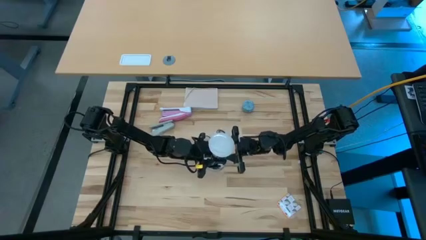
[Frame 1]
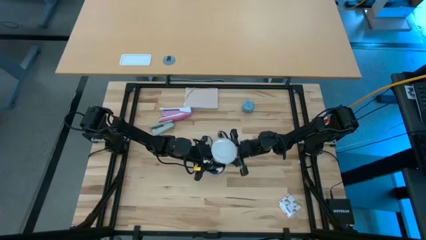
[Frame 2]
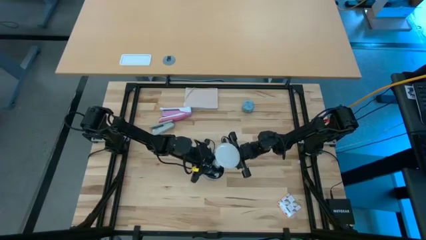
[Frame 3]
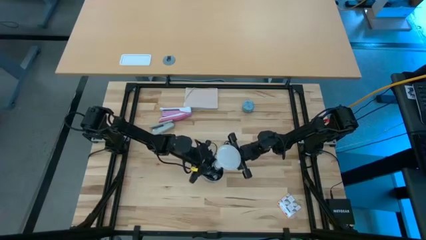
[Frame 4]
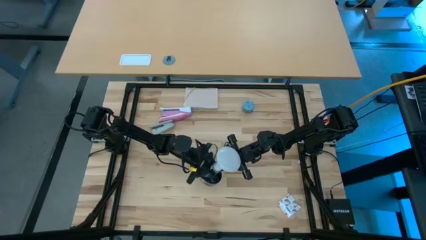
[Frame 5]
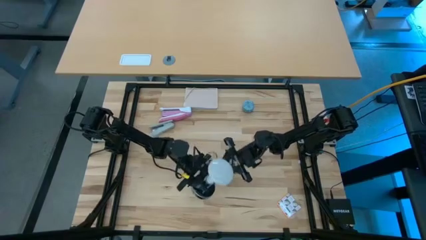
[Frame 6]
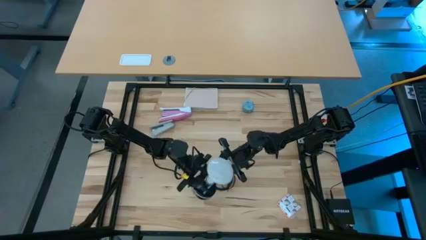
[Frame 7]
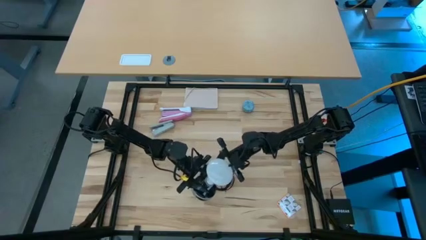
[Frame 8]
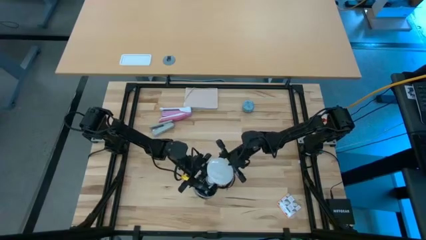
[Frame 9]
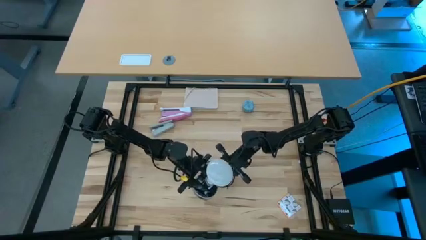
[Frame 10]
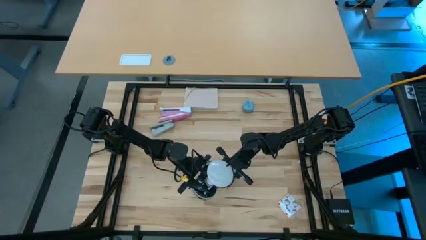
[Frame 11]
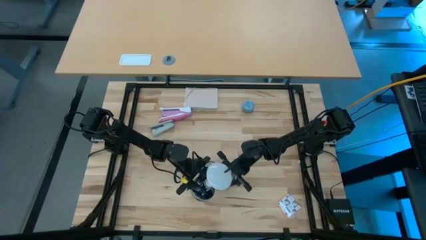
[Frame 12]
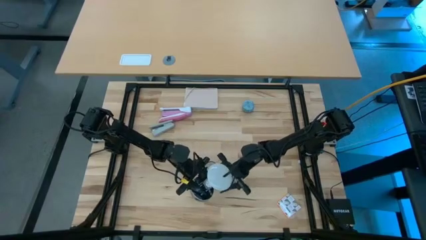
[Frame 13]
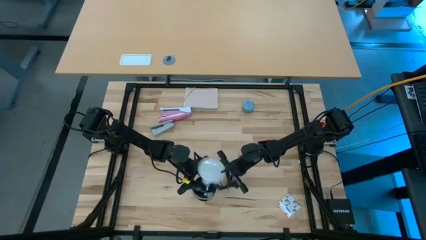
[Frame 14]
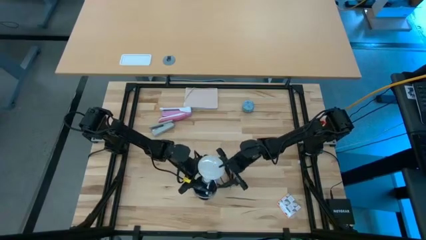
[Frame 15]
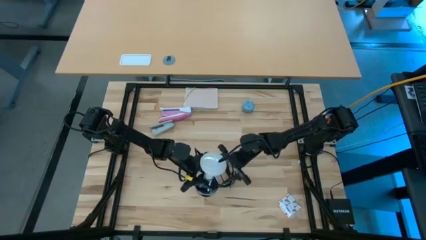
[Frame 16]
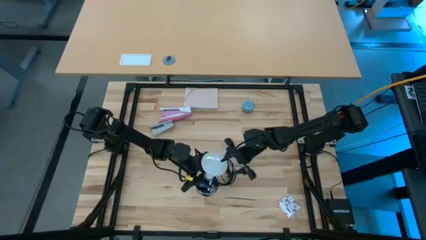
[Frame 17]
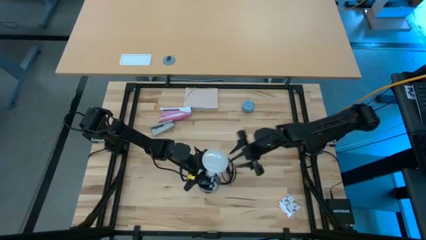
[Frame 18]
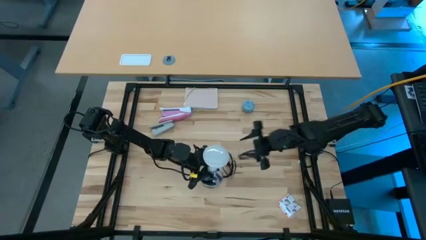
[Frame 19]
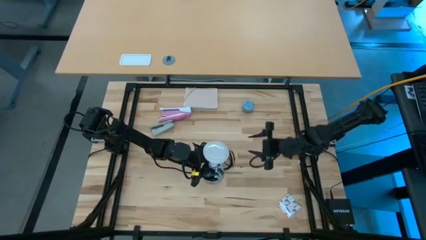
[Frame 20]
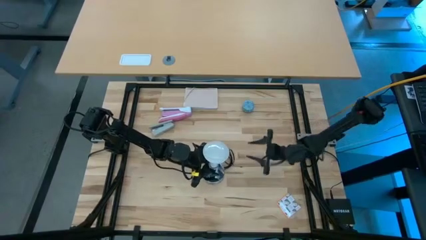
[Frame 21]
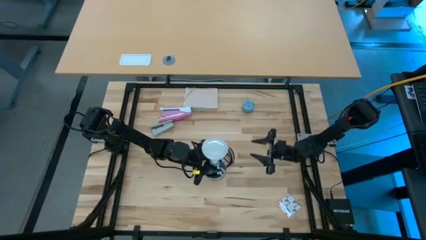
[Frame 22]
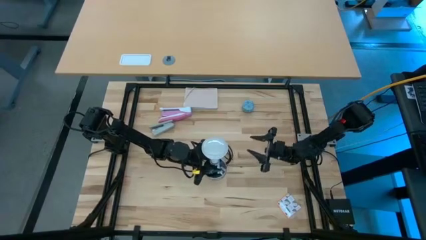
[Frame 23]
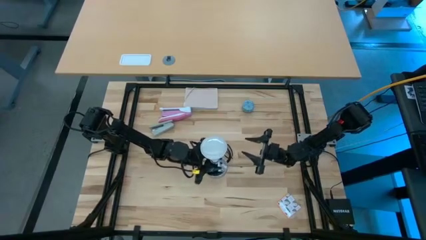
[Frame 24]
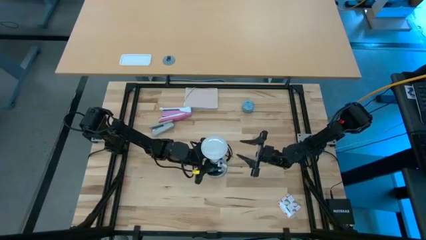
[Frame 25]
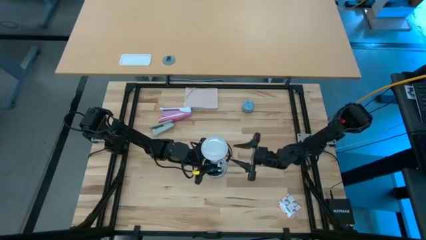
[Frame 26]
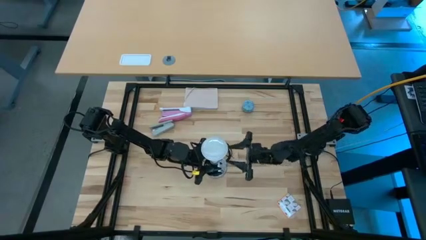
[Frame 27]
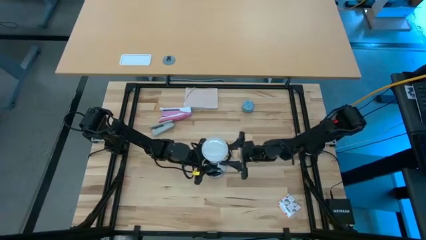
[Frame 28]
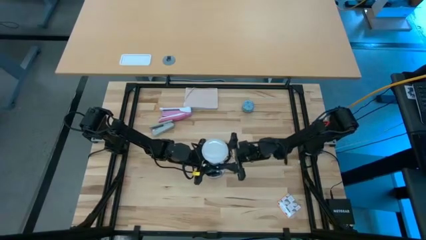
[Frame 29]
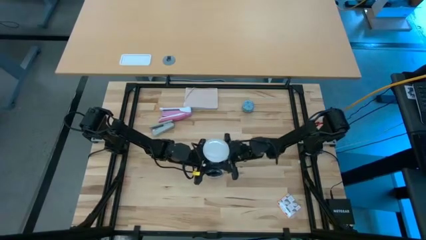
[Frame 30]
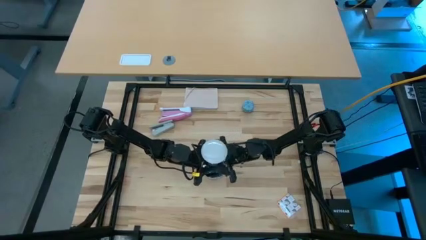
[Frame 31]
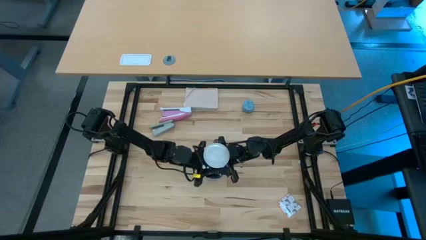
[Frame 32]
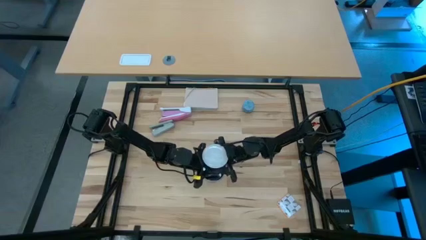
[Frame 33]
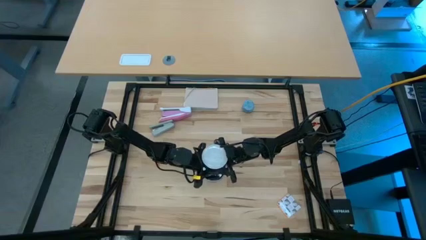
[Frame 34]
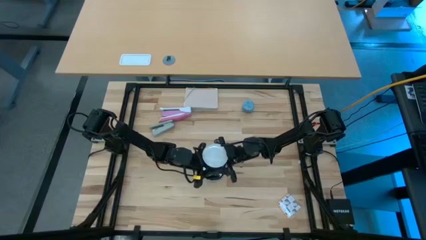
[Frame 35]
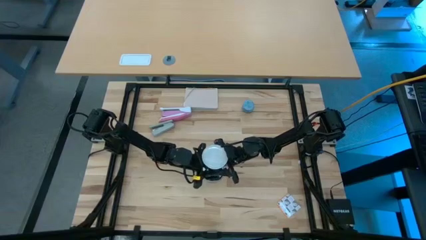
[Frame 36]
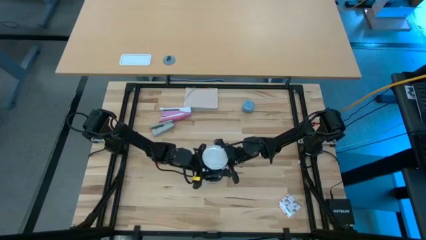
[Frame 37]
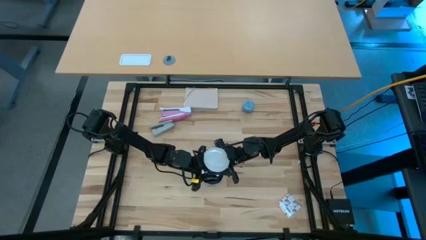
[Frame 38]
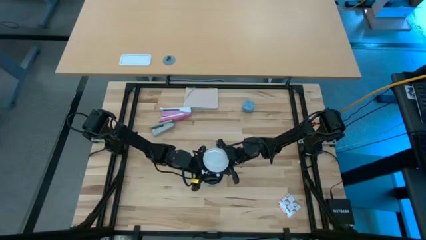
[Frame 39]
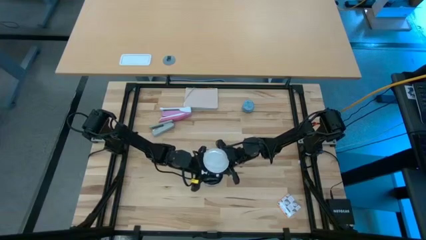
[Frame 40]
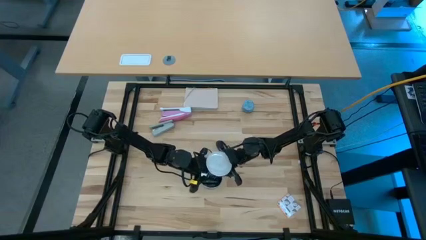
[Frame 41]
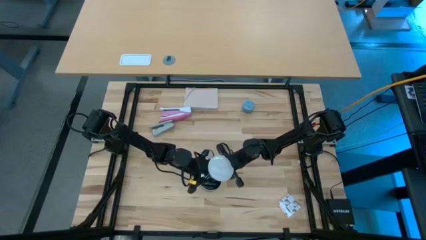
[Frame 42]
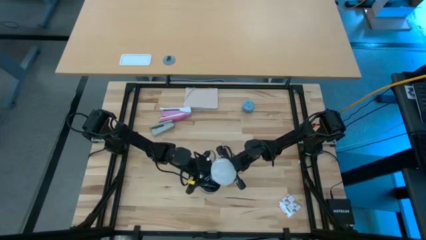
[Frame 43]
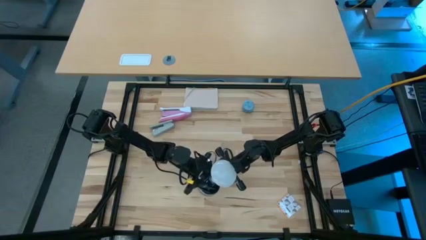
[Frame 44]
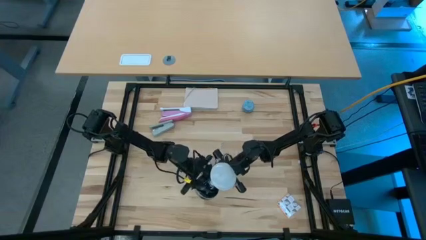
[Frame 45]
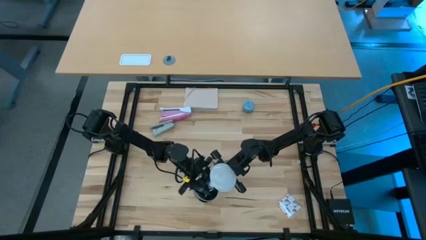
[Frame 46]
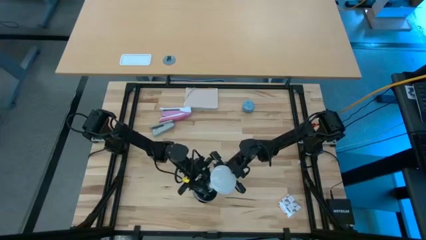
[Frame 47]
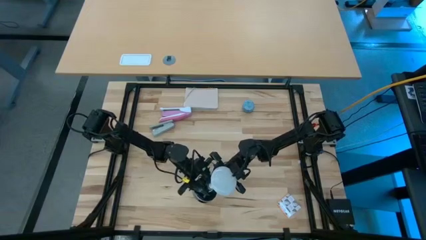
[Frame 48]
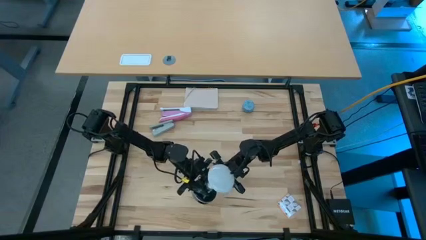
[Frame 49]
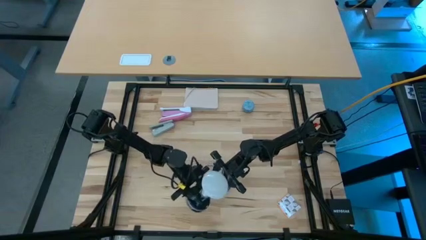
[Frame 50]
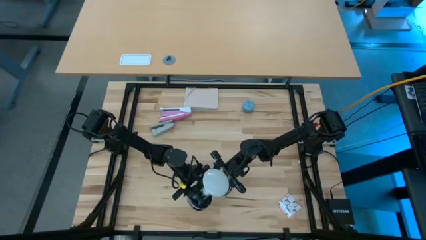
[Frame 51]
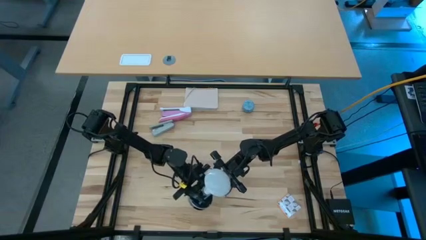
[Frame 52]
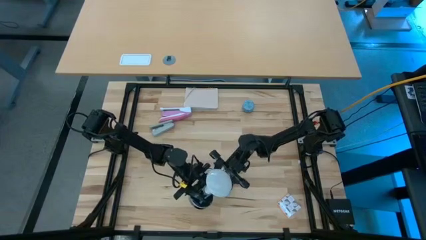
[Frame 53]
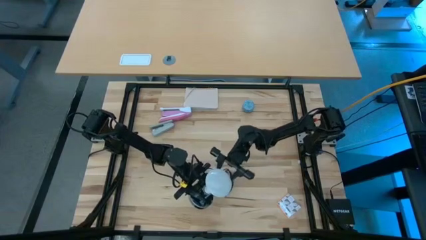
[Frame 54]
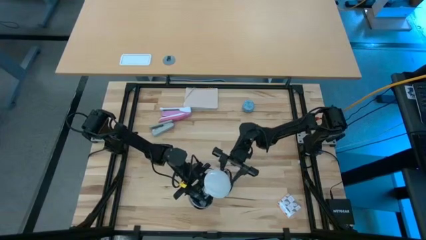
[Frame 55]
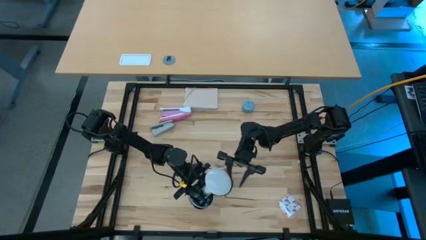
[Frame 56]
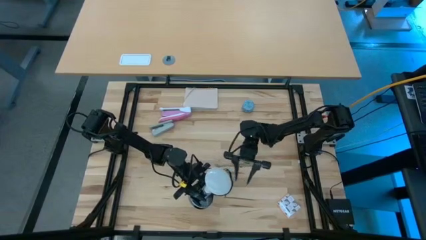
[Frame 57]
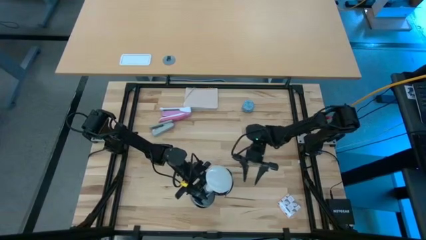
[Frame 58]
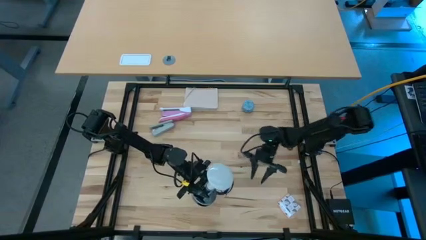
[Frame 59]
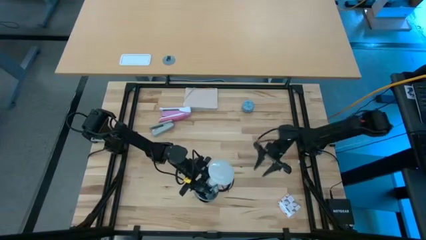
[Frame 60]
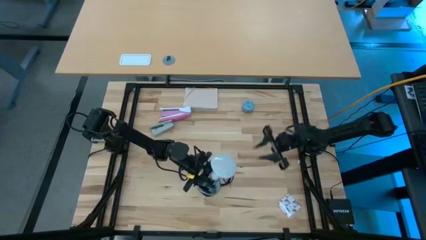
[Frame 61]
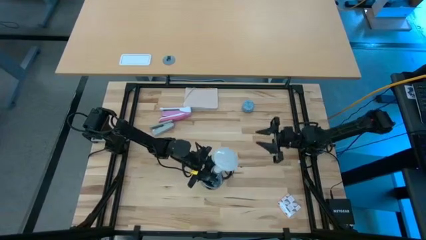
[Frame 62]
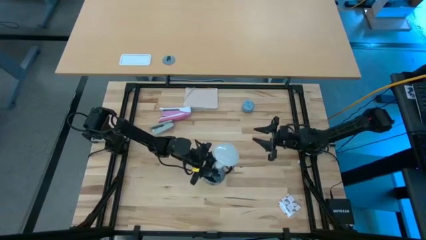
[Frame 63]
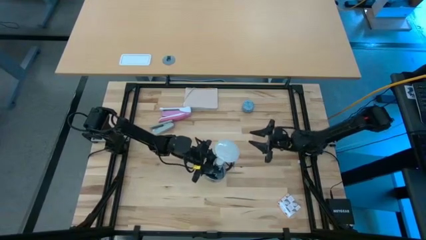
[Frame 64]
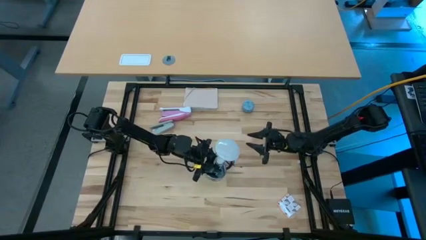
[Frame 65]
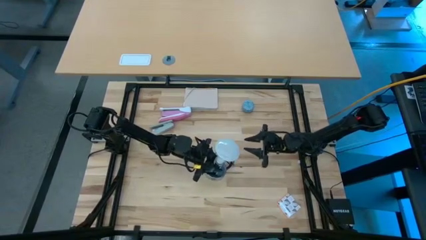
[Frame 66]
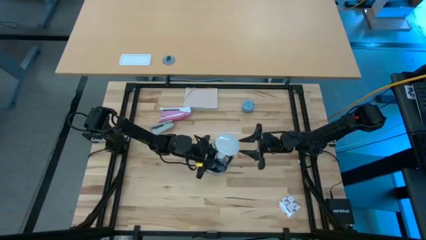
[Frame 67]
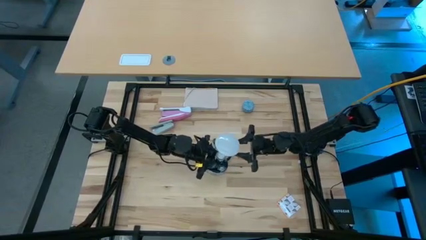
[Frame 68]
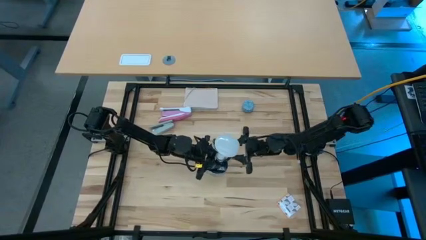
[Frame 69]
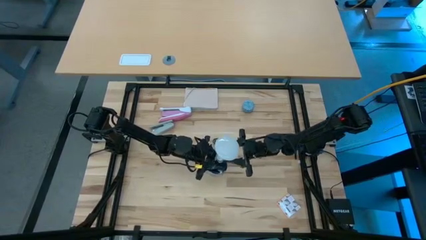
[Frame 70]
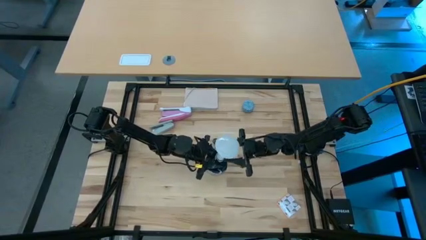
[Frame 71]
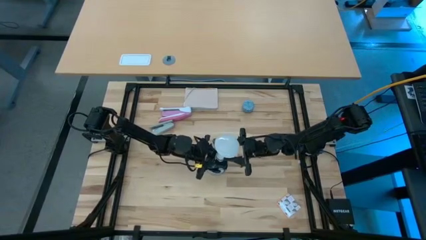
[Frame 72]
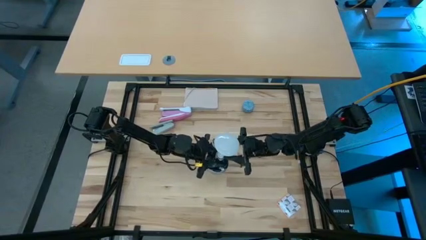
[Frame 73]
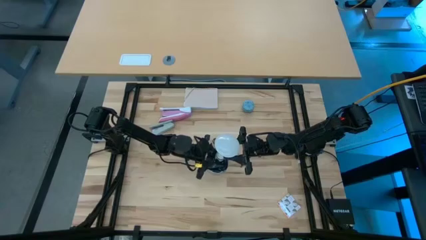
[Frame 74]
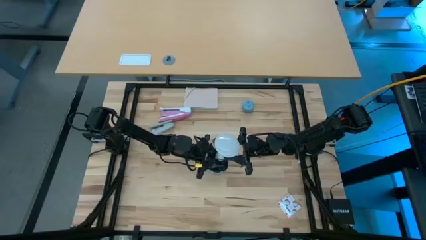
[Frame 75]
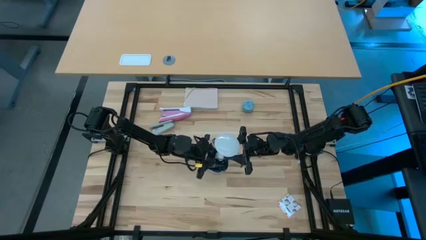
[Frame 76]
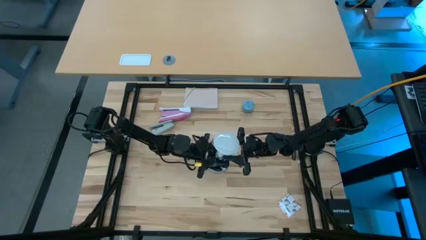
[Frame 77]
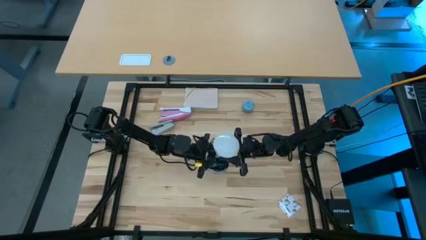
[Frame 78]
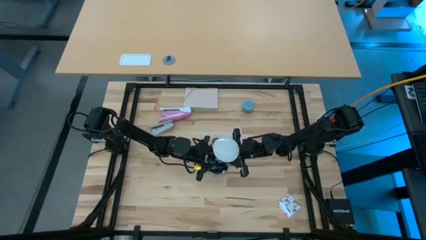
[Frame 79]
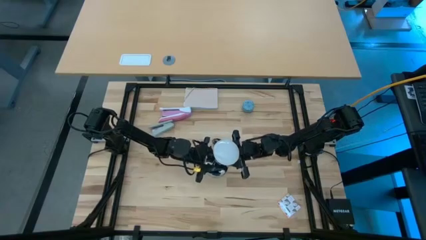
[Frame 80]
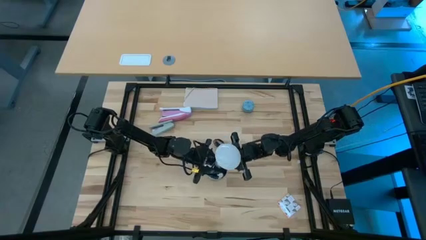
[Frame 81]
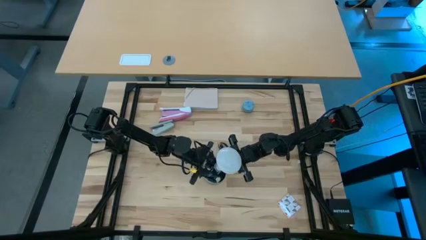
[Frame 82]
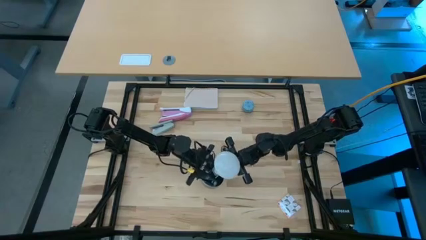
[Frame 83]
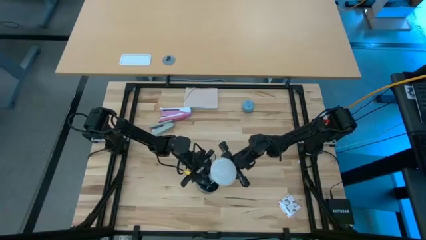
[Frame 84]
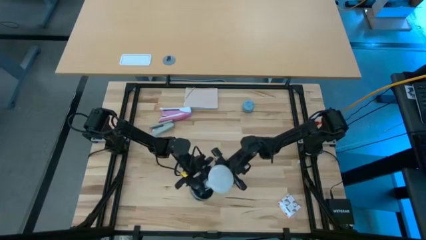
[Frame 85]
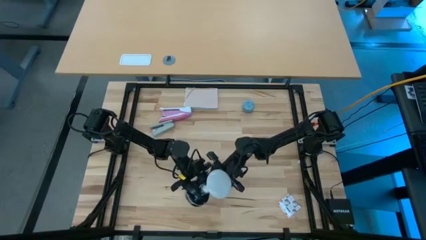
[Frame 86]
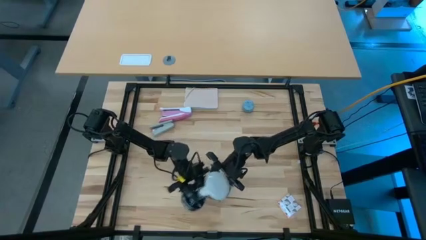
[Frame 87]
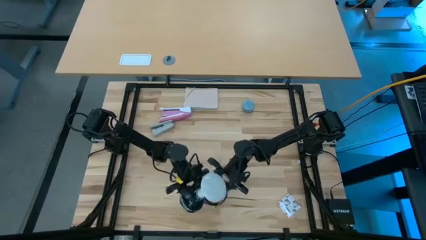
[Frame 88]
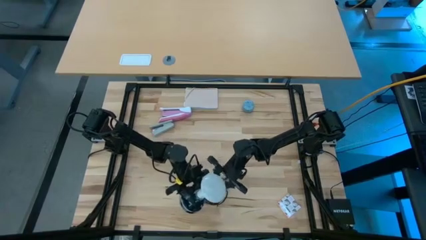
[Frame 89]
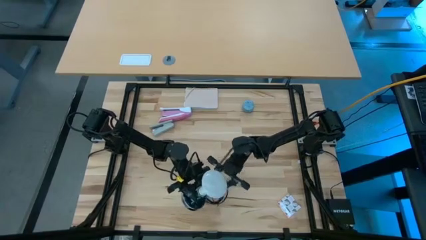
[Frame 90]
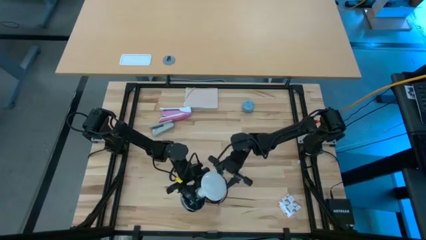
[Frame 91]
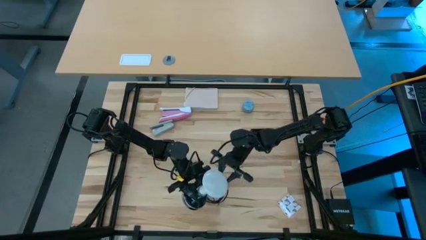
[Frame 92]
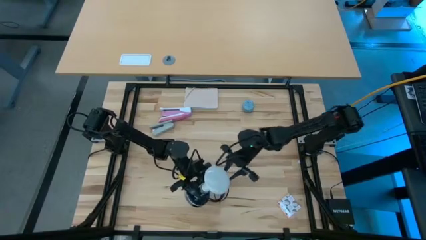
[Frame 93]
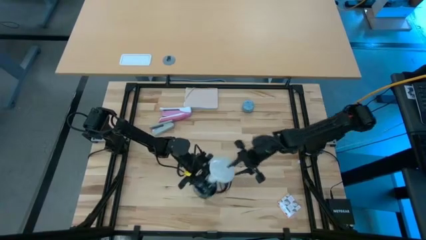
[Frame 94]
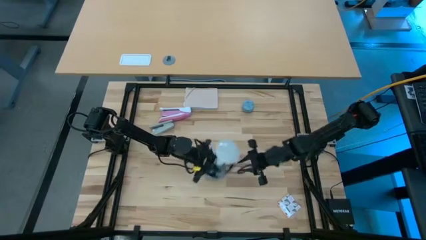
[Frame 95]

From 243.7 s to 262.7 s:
Task: Screw lightbulb
Remove the white lightbulb from the desk lamp
